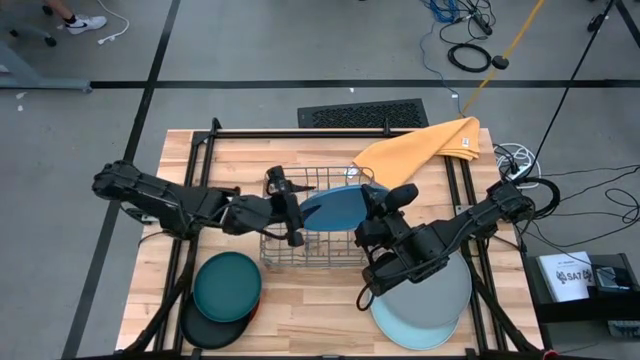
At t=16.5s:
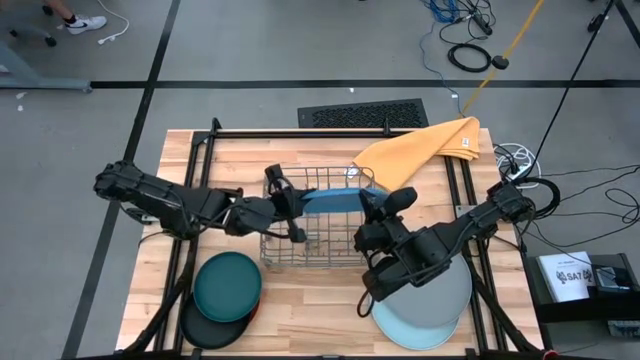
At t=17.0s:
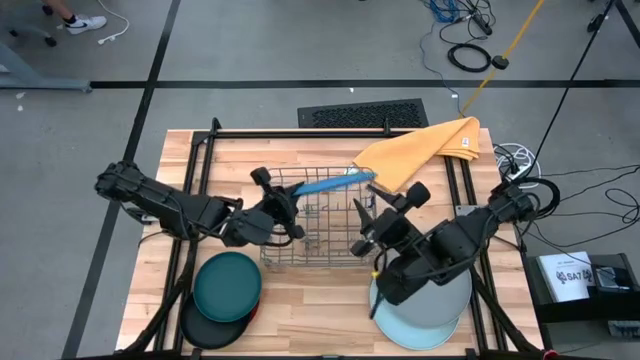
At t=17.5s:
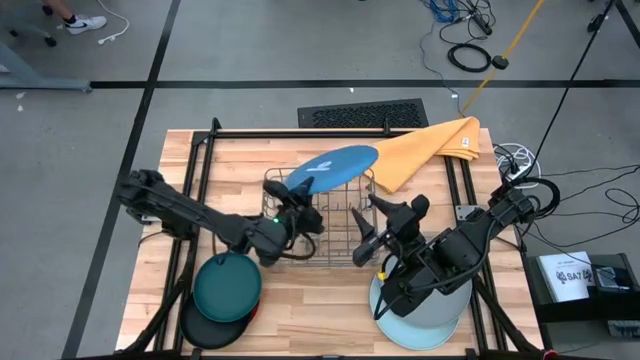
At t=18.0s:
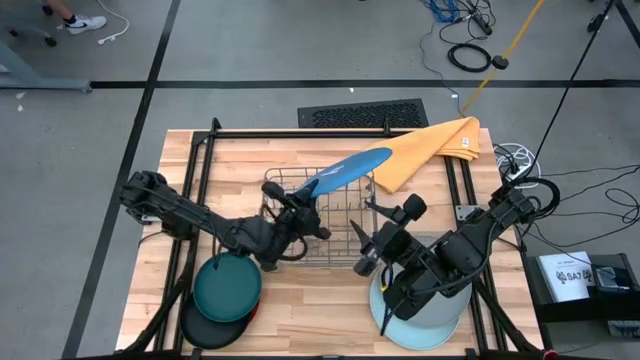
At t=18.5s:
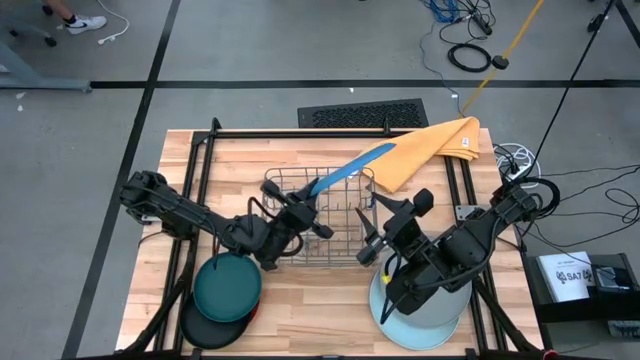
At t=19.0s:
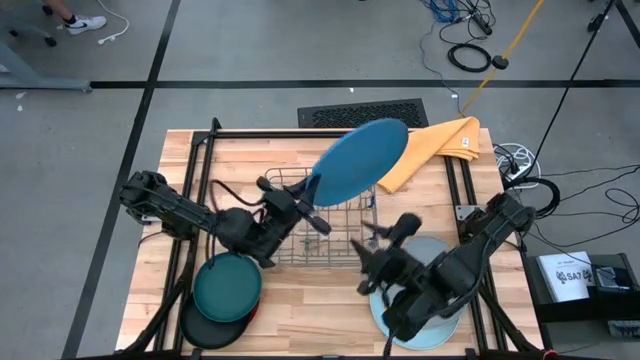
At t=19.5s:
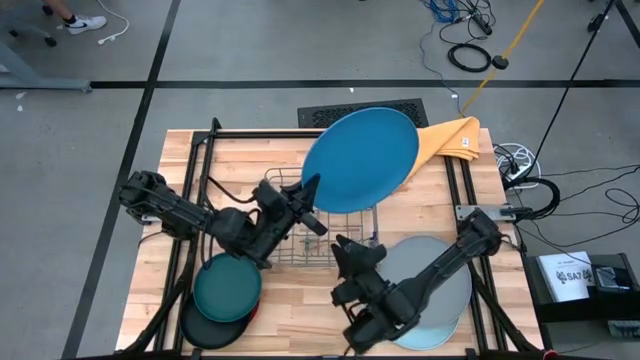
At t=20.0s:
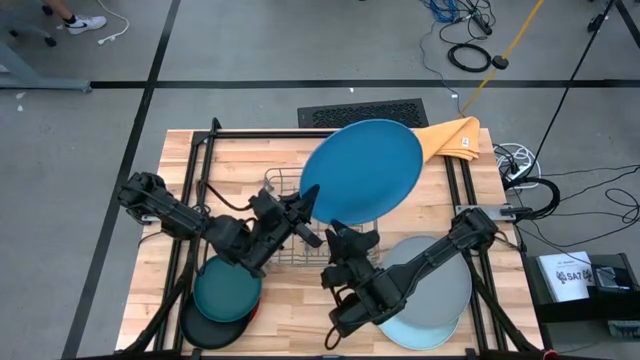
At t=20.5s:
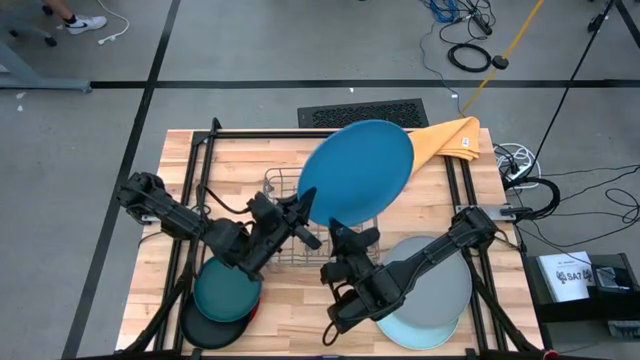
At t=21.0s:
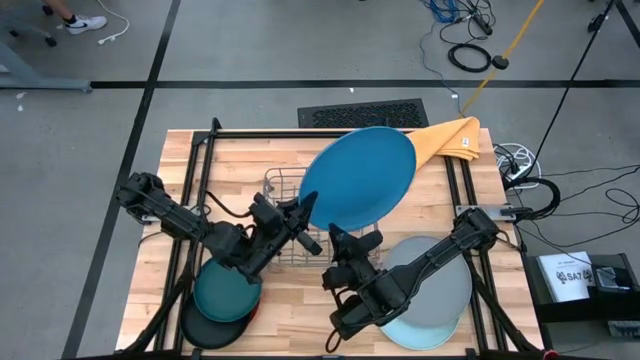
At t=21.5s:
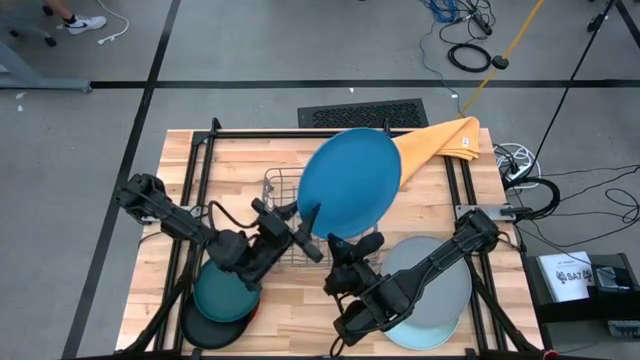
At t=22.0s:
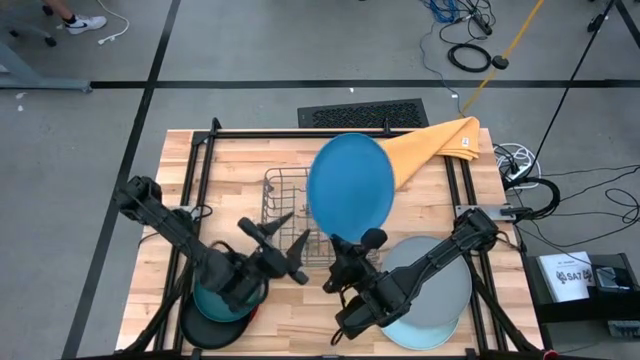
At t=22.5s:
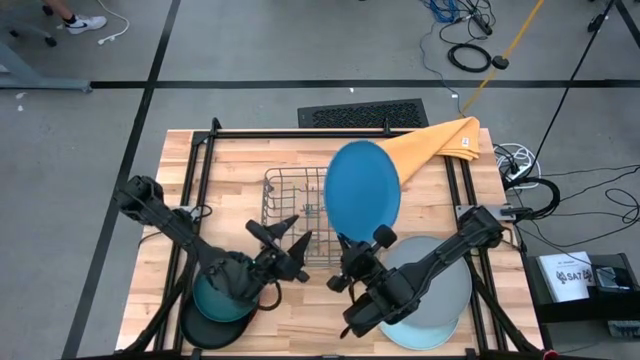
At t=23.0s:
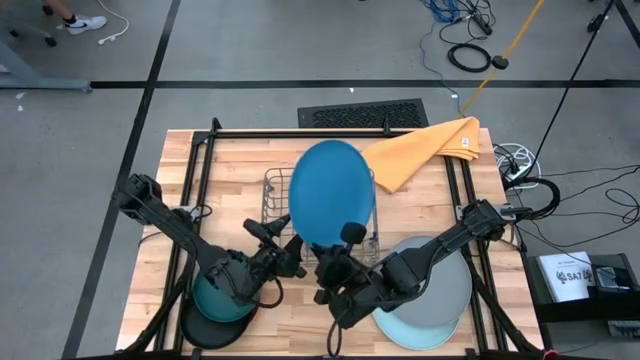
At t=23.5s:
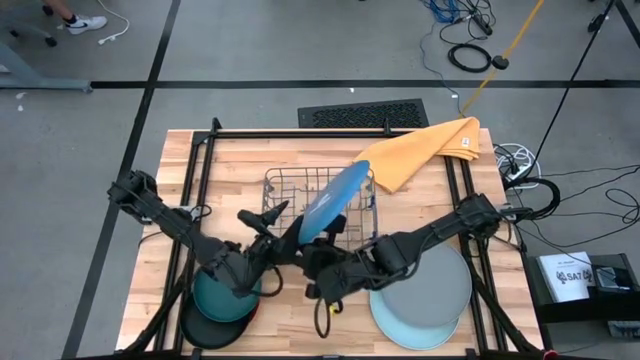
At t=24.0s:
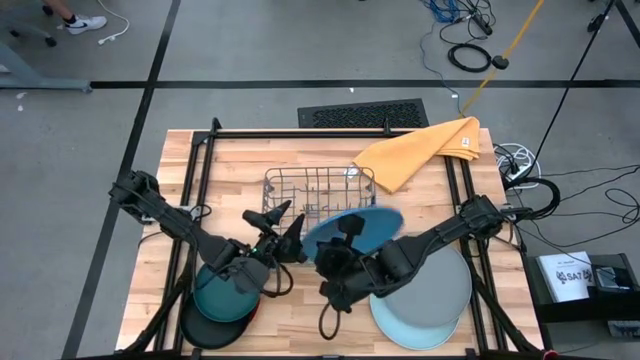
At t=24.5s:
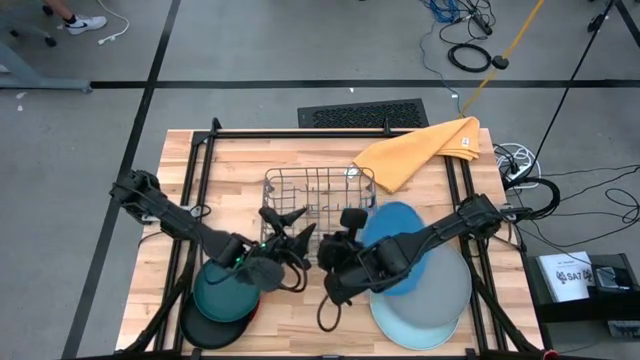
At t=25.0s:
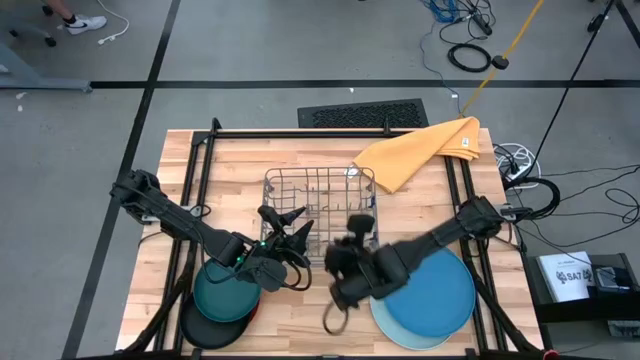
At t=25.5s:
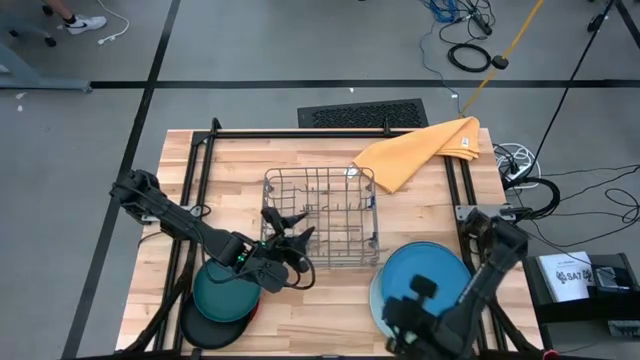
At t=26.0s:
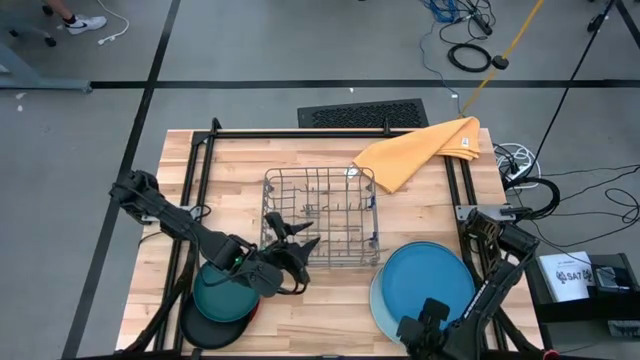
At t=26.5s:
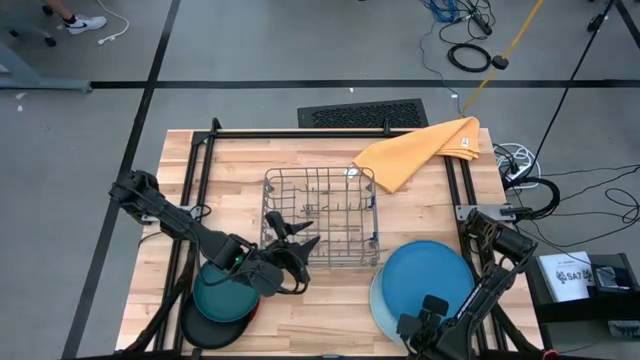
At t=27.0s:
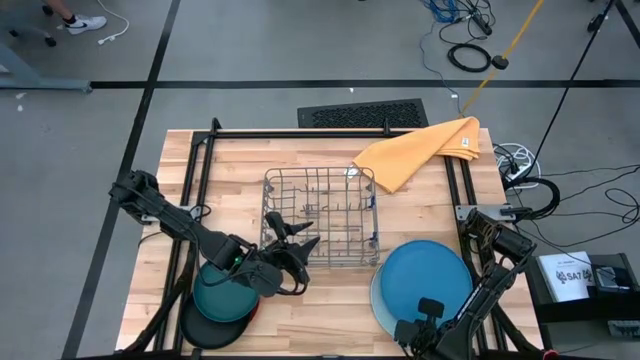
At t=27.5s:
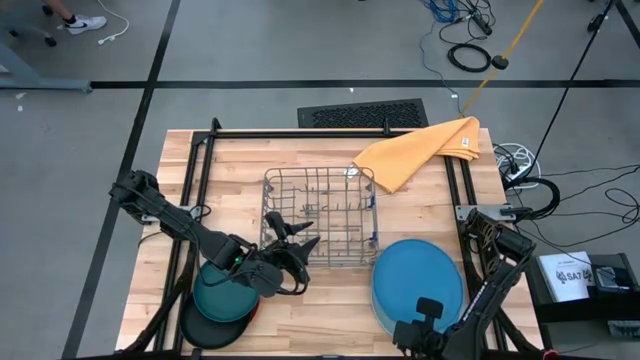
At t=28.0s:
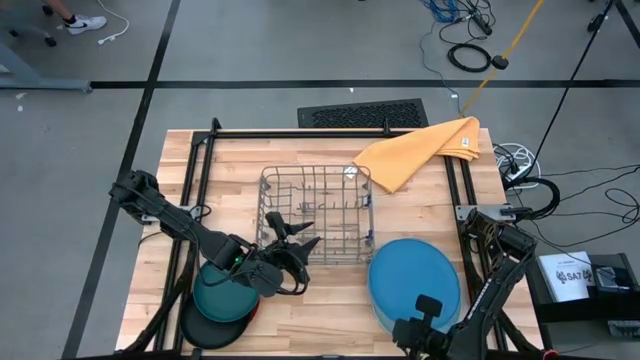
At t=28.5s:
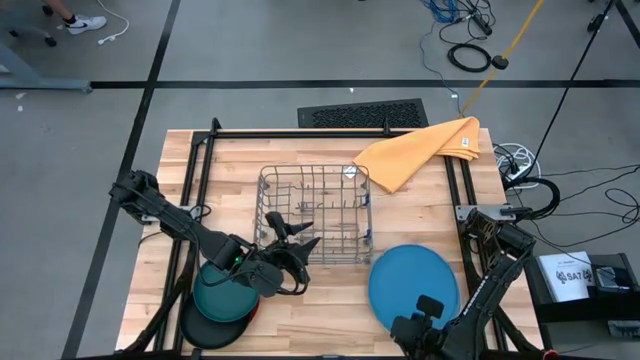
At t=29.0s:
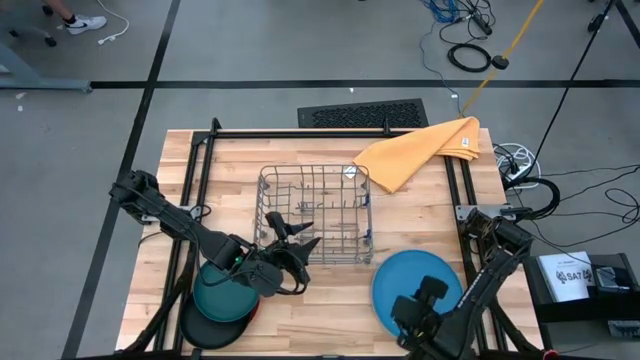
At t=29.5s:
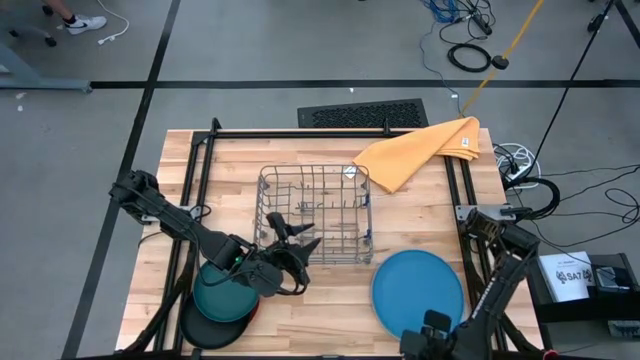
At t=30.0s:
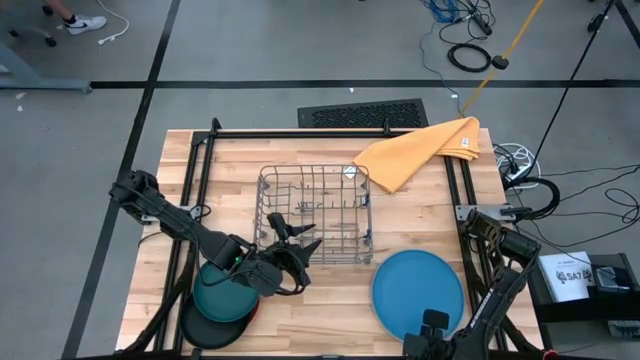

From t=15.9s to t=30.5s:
Task: Sort dishes
Put the blue plate into the green dish rack

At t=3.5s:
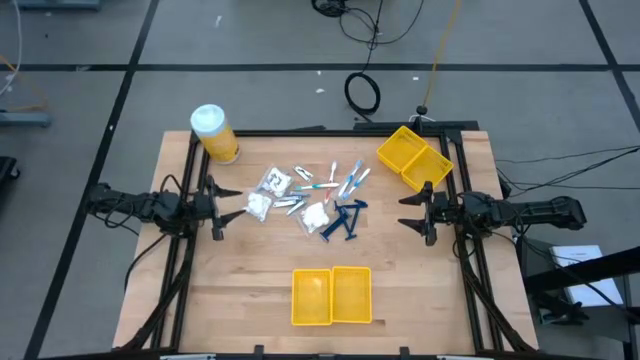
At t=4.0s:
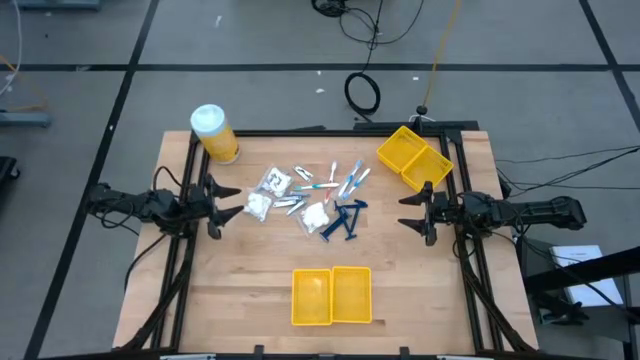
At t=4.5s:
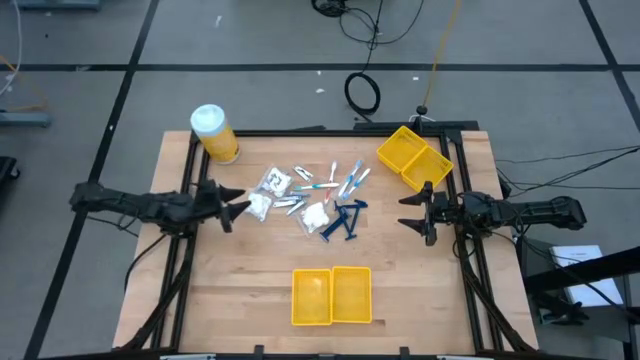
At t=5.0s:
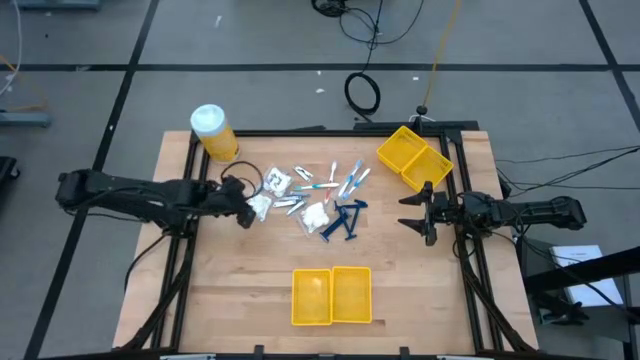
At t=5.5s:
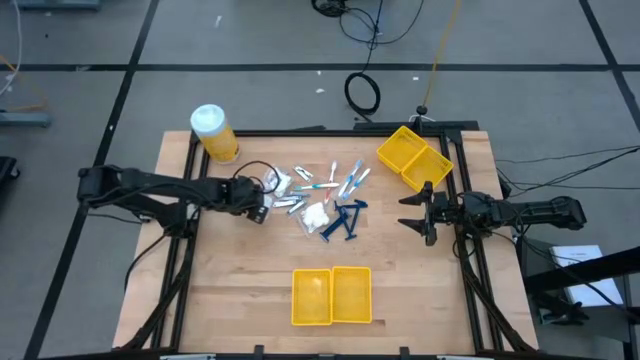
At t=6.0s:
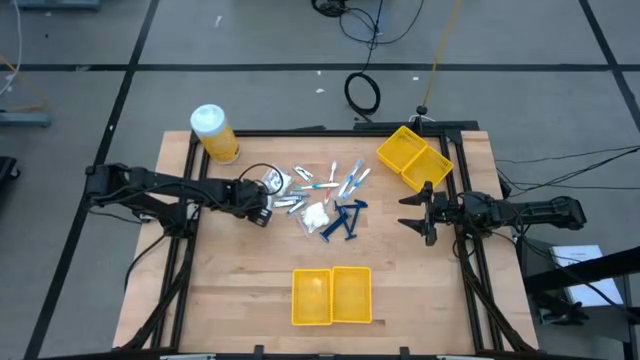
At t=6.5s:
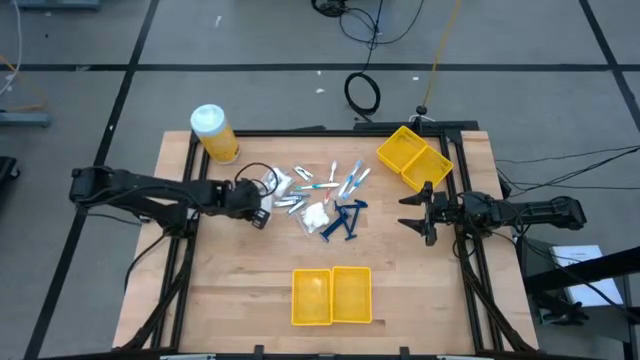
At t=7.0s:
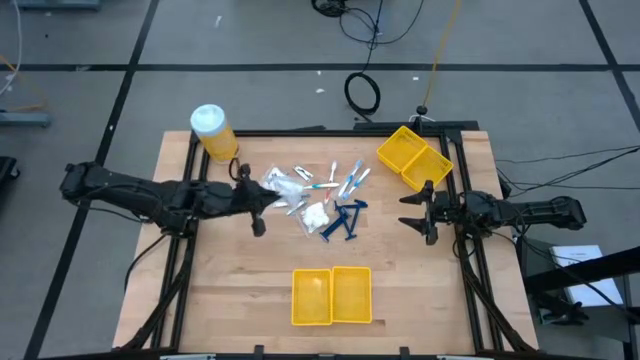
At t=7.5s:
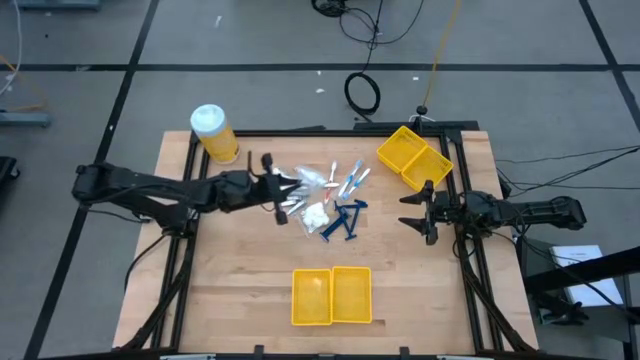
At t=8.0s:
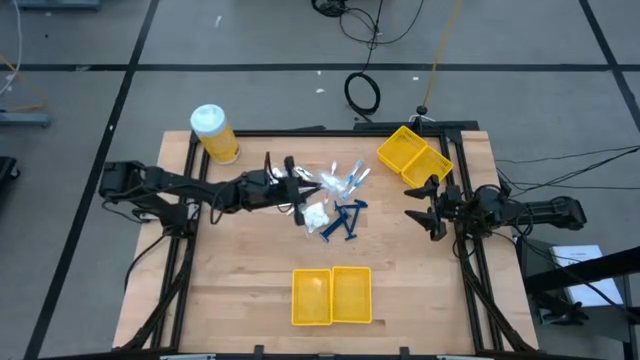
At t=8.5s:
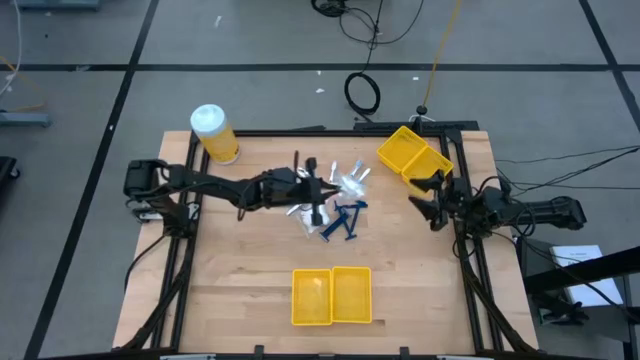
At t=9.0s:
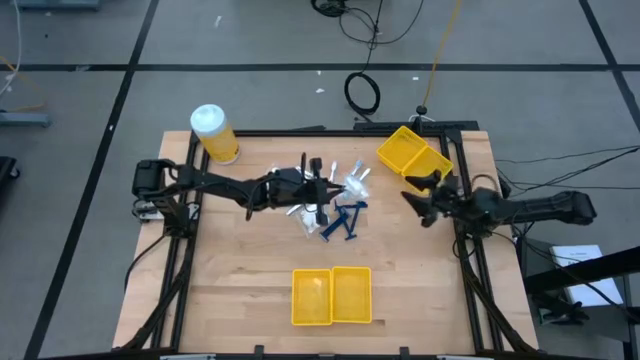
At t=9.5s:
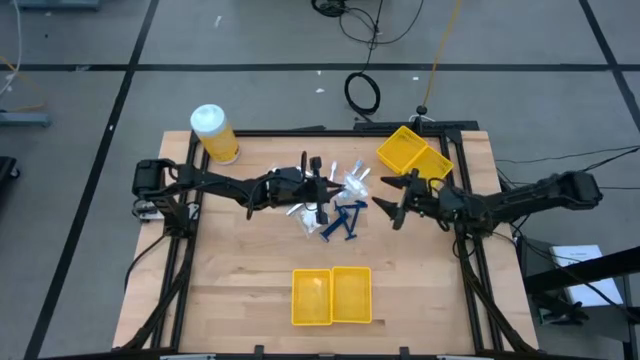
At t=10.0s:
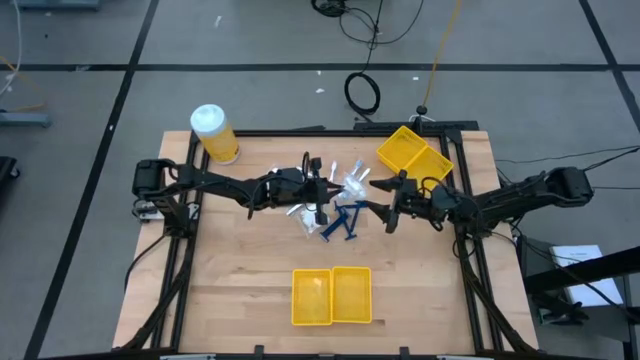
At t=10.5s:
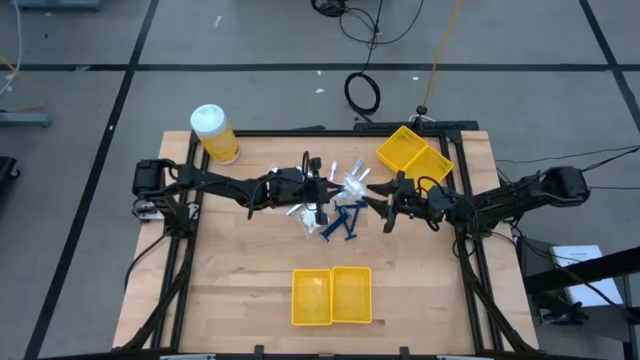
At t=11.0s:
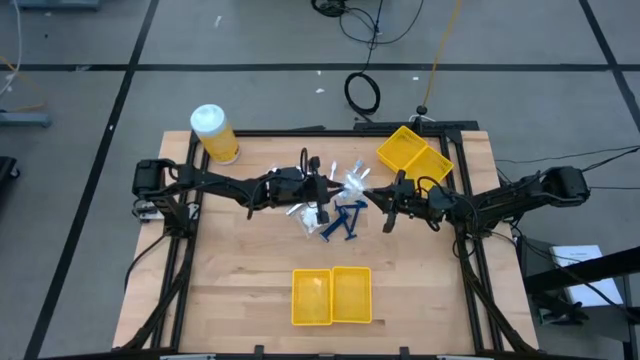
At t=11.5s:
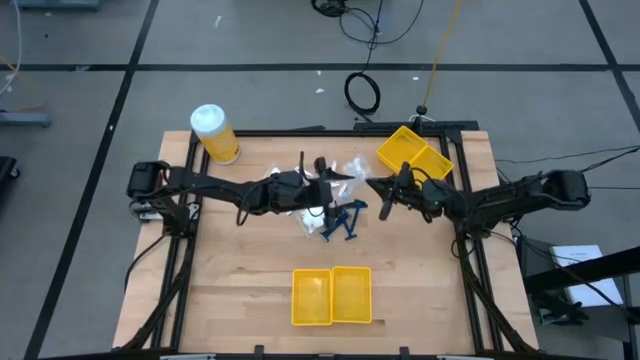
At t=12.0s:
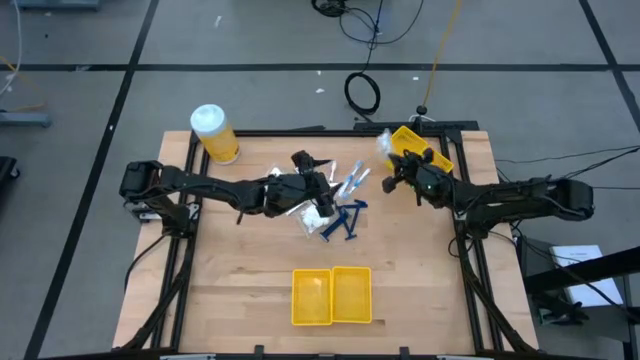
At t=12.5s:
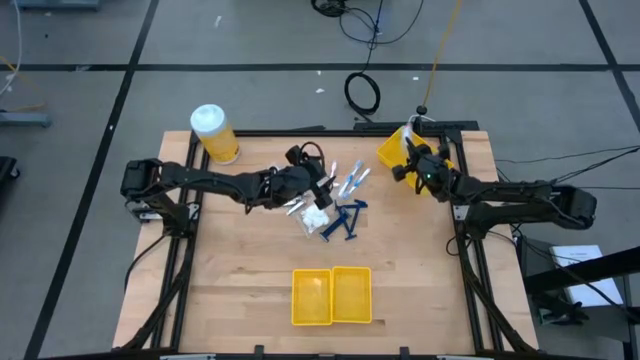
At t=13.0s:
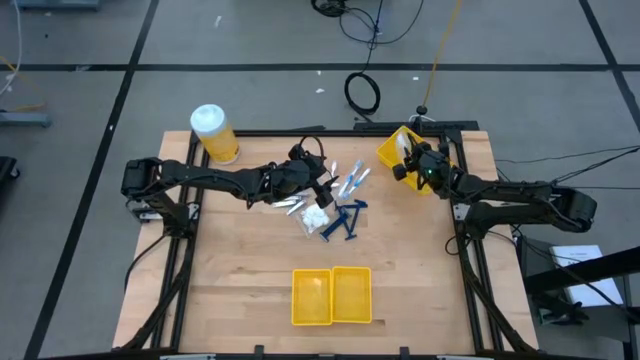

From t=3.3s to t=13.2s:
Task: Pick & Place Travel size toiletries
Put the bottom left white cotton pack into the top left yellow bin
